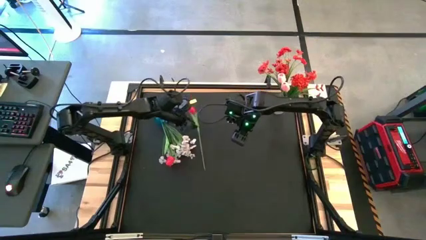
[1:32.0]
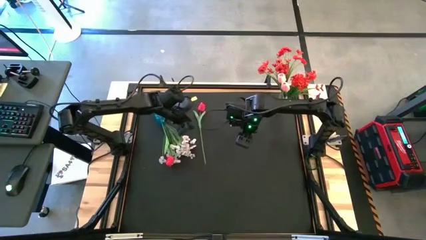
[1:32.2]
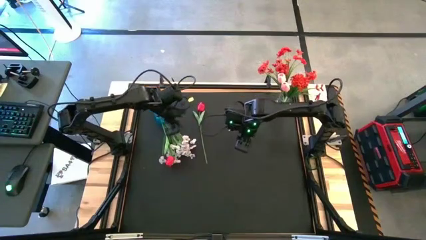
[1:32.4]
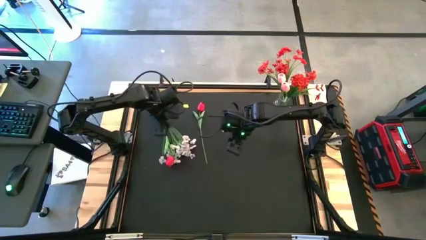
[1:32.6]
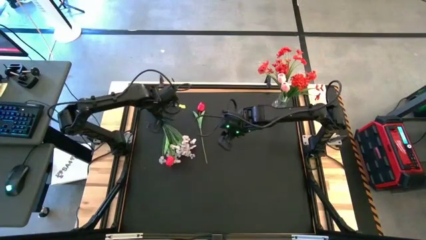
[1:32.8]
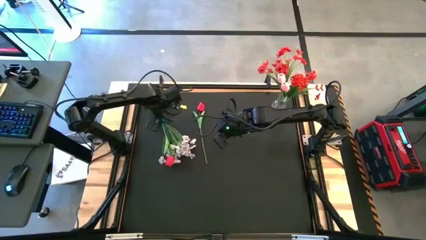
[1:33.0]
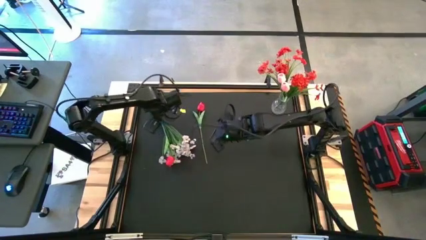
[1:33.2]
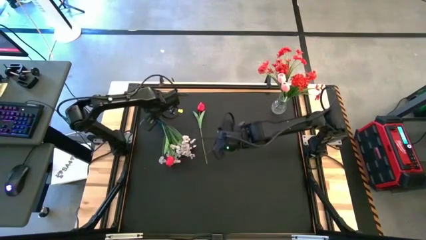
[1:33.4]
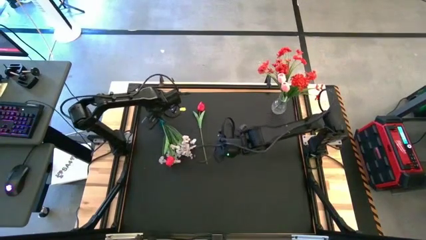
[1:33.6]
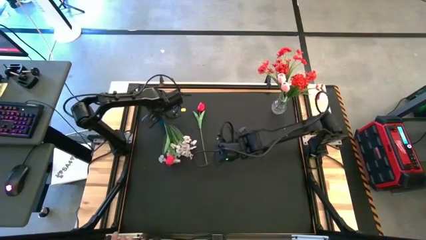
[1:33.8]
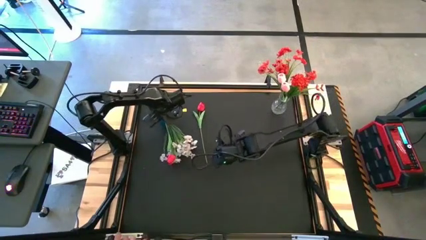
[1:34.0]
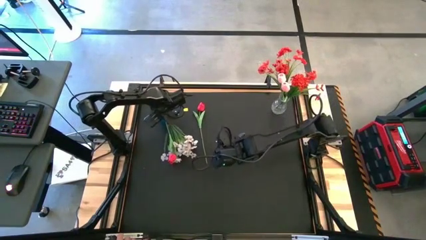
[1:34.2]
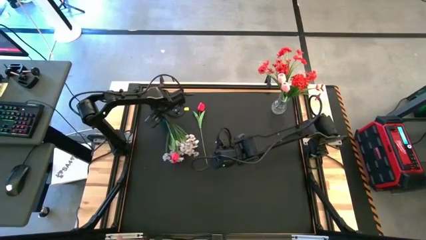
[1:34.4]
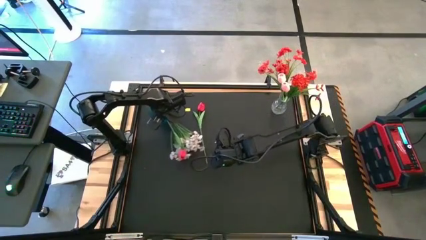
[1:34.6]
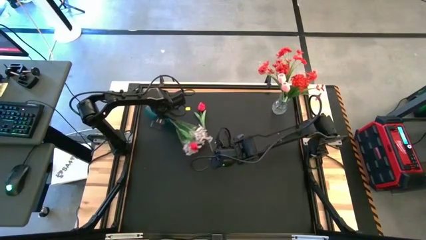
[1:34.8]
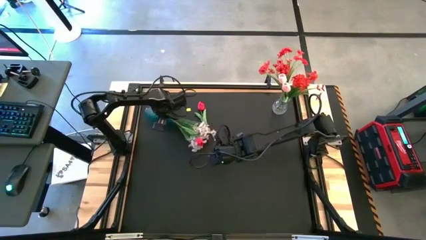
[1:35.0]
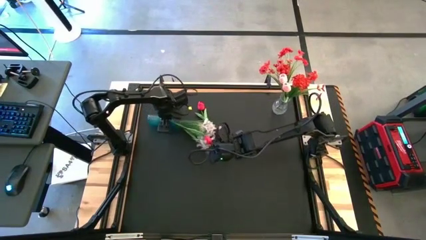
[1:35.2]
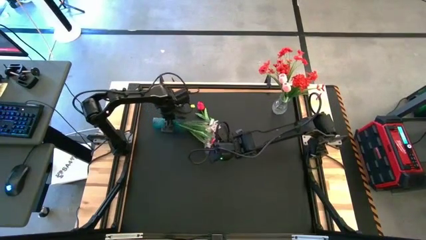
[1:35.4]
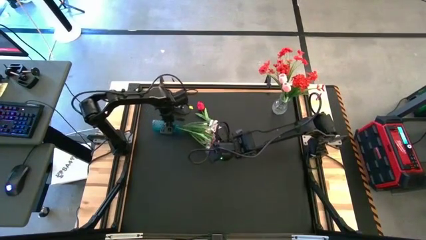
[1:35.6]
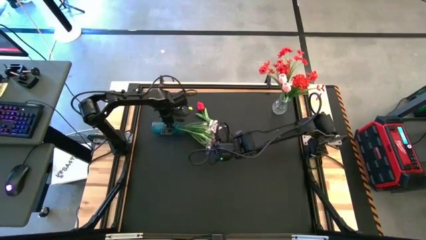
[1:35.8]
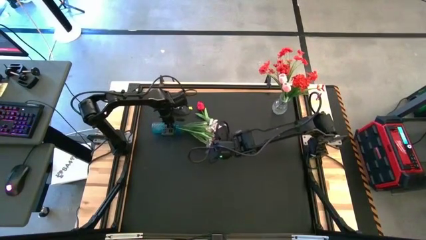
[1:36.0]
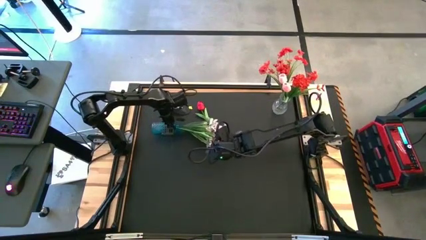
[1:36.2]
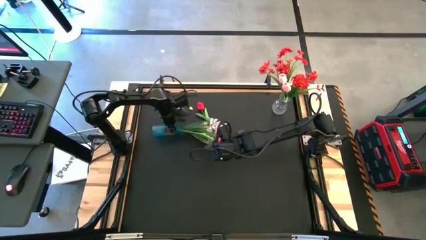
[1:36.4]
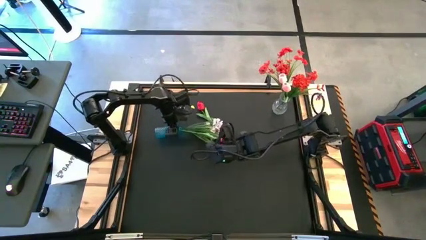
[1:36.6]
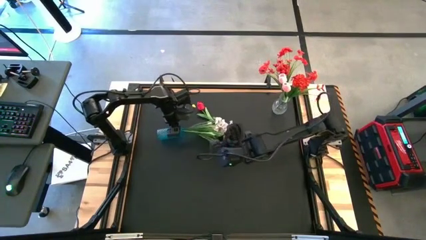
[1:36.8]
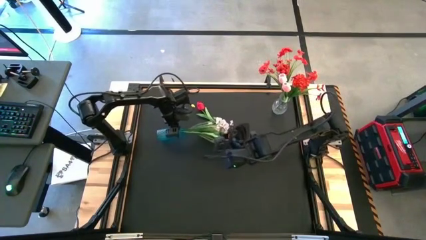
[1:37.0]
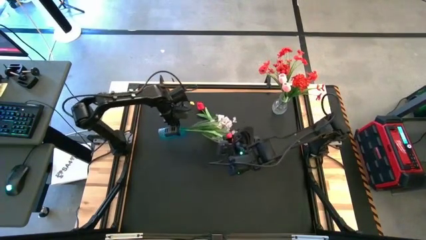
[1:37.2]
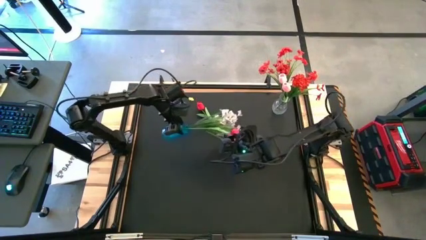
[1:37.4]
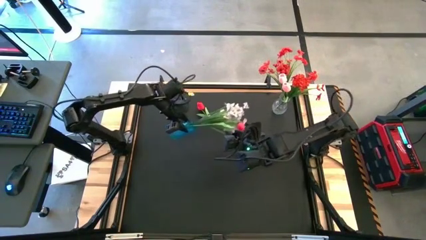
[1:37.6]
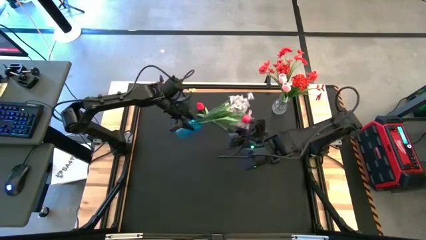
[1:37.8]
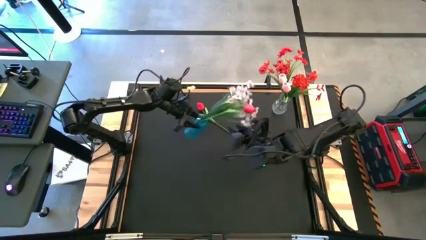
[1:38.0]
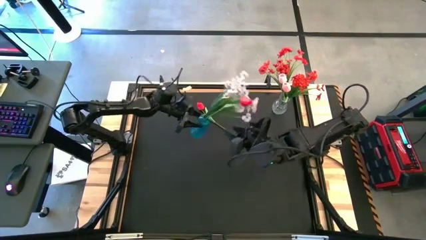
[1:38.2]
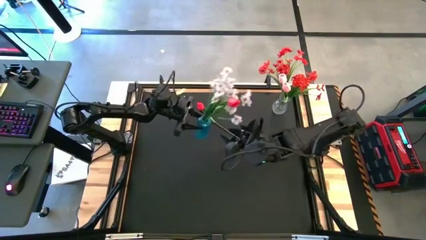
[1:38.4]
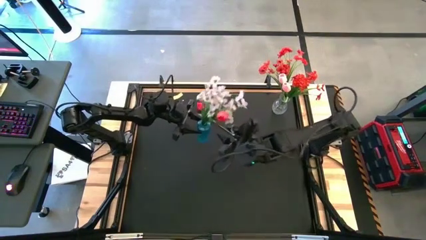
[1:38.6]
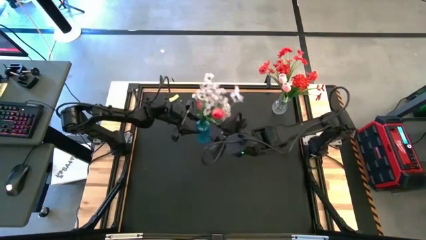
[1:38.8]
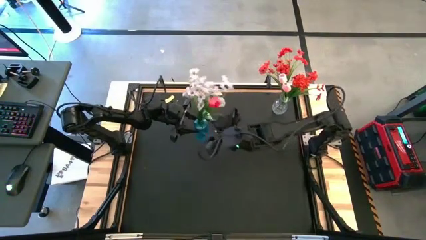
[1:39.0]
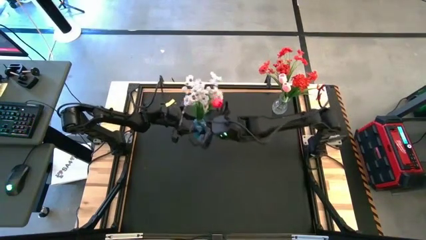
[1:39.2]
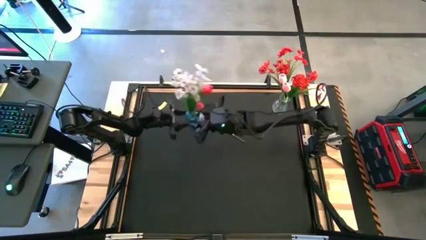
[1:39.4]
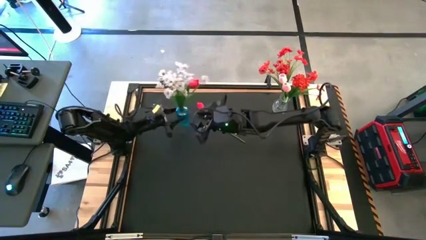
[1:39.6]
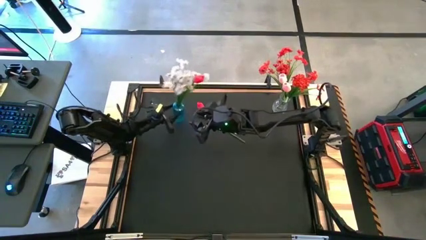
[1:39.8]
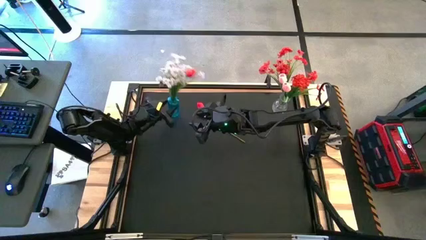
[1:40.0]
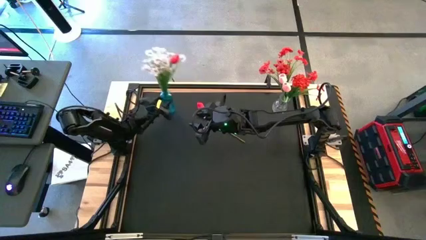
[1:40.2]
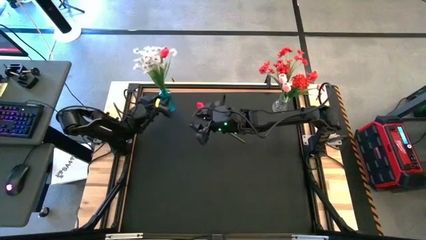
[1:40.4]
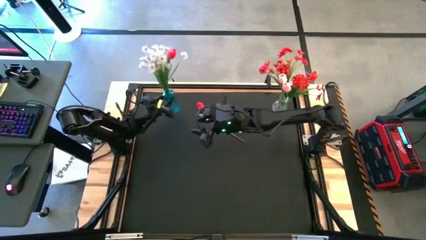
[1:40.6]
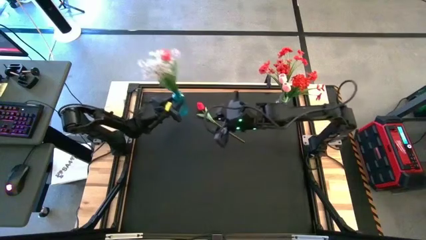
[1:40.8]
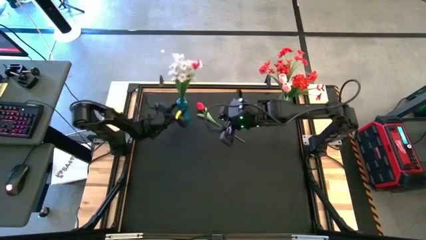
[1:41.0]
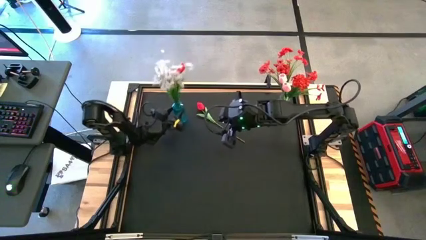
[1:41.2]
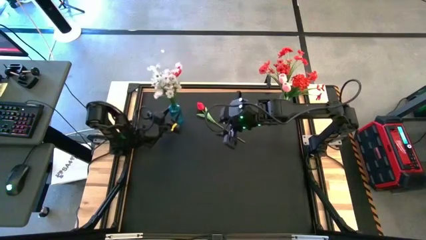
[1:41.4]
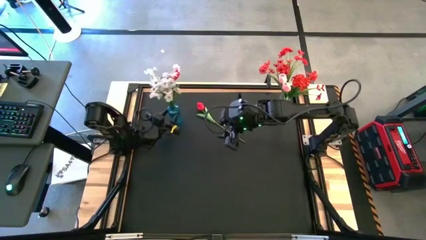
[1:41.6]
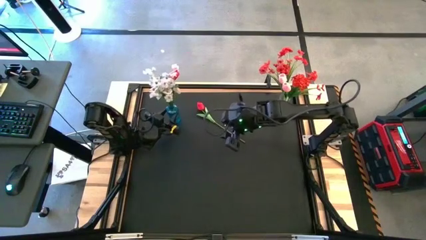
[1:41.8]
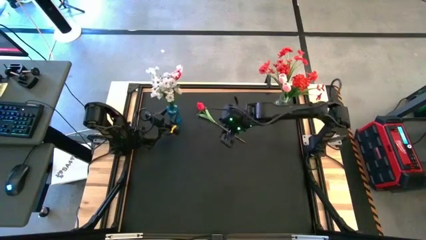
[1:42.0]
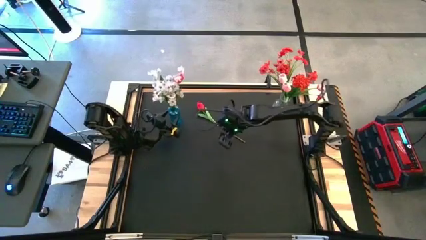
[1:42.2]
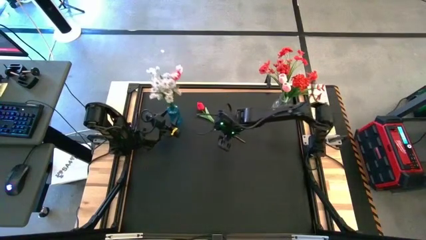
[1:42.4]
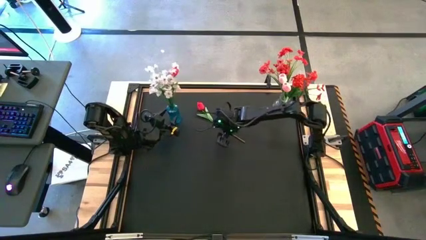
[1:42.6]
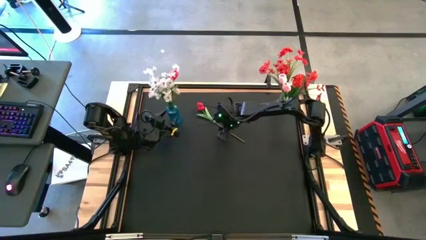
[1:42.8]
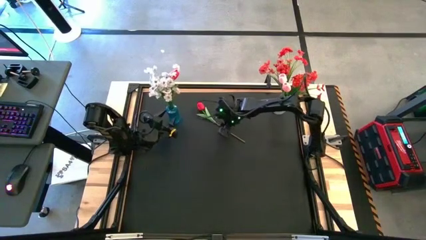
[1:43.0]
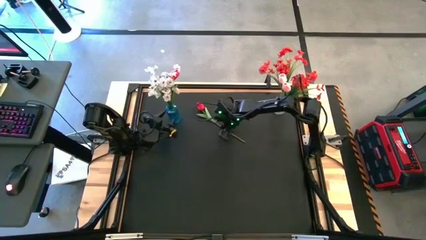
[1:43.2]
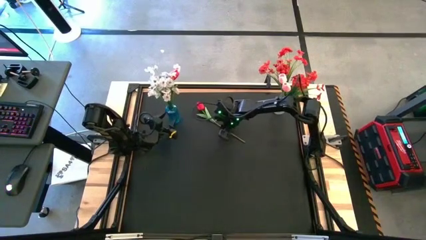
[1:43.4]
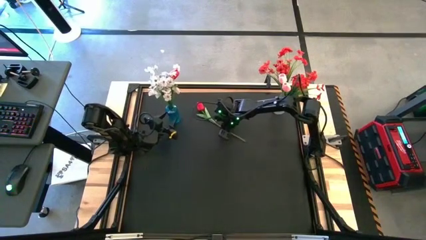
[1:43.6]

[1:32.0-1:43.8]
Task: Sort flowers into vase by color
Adjust the blue vase
